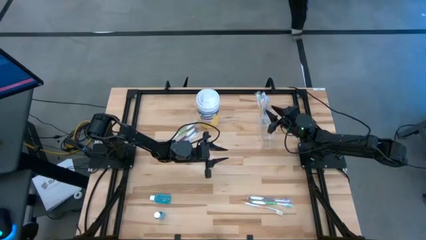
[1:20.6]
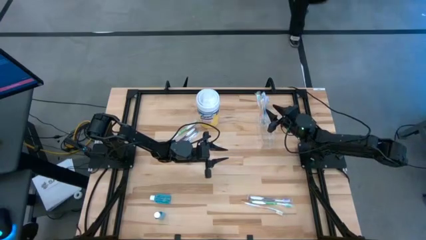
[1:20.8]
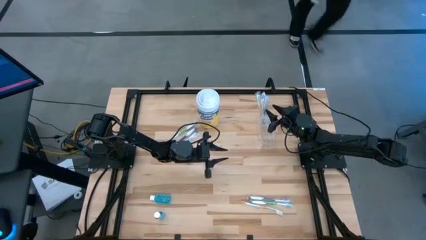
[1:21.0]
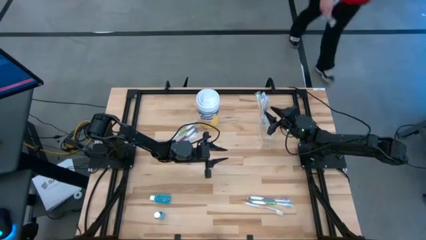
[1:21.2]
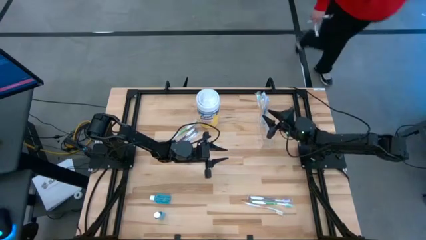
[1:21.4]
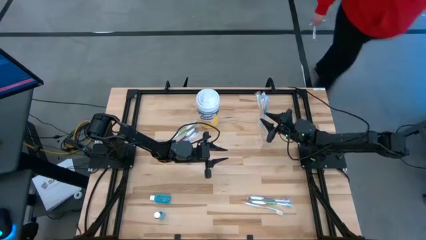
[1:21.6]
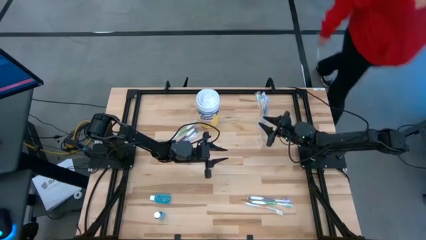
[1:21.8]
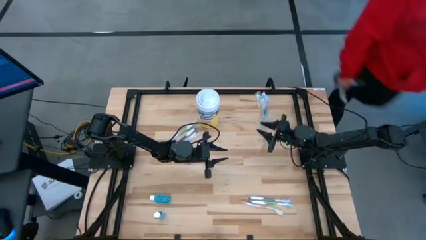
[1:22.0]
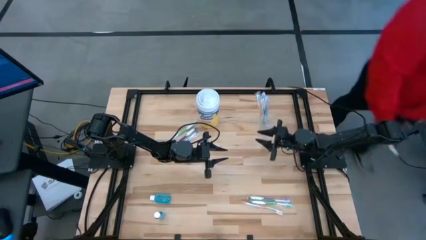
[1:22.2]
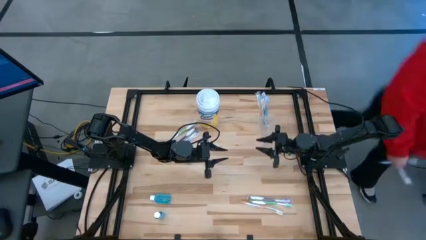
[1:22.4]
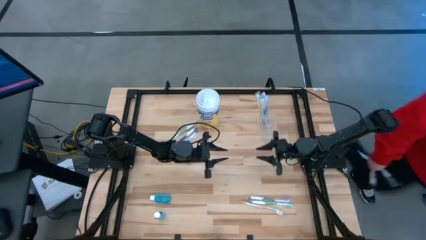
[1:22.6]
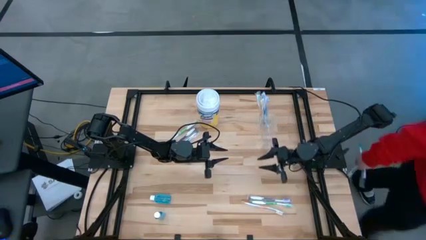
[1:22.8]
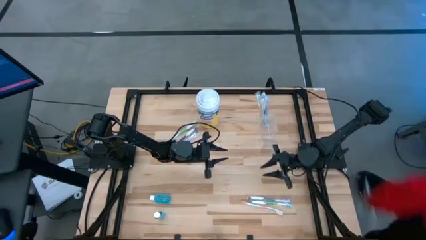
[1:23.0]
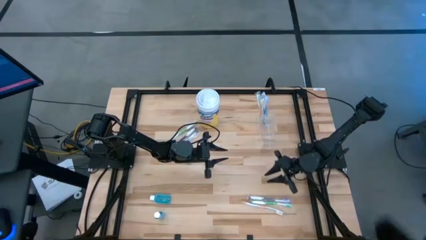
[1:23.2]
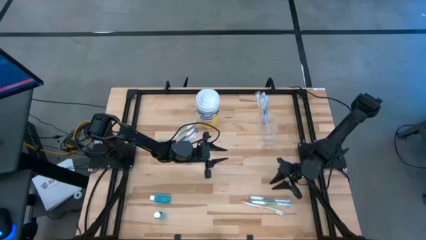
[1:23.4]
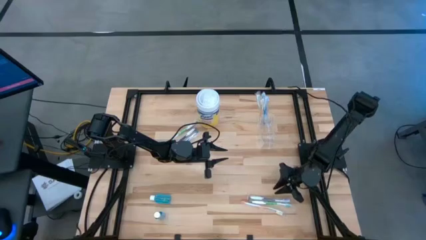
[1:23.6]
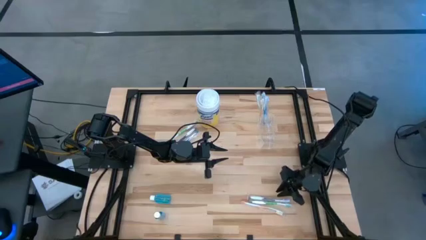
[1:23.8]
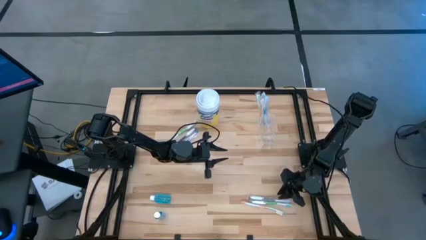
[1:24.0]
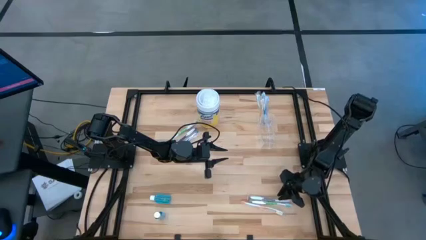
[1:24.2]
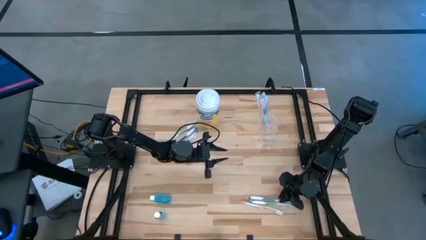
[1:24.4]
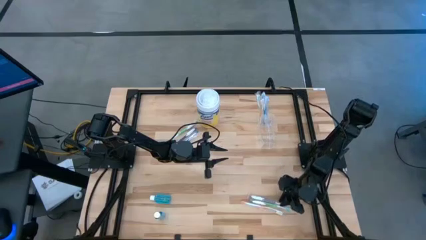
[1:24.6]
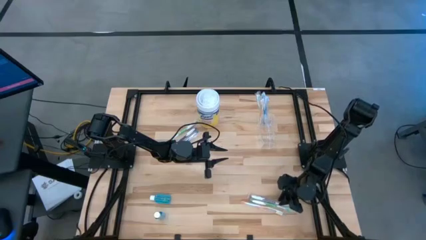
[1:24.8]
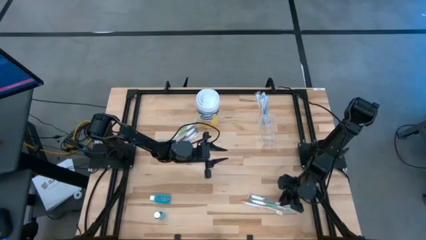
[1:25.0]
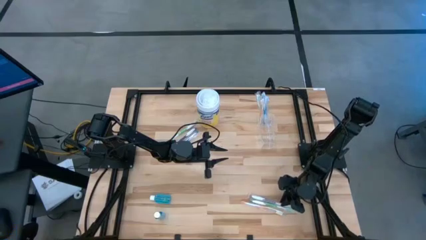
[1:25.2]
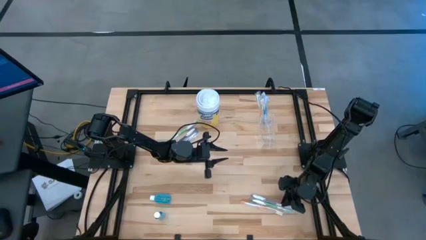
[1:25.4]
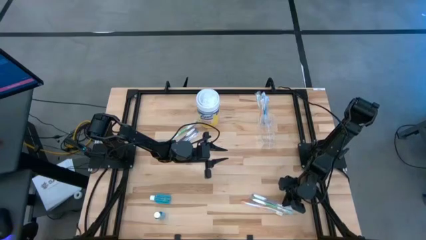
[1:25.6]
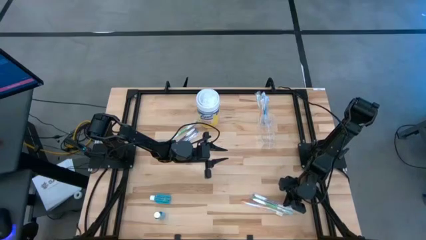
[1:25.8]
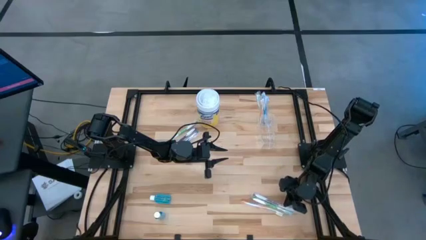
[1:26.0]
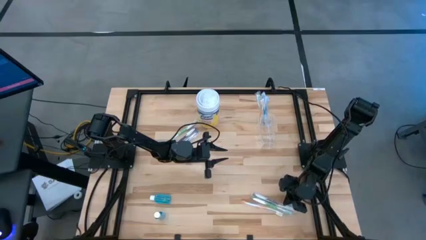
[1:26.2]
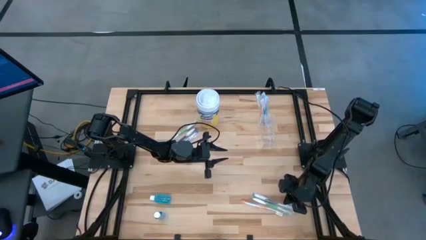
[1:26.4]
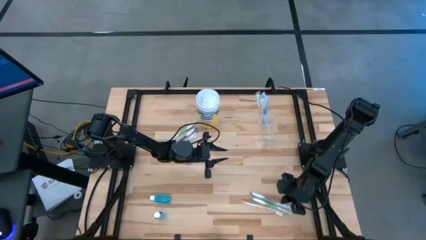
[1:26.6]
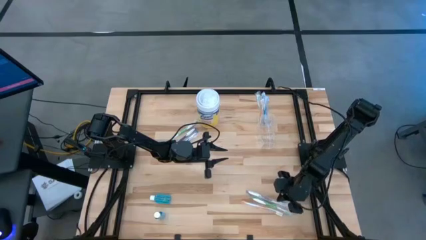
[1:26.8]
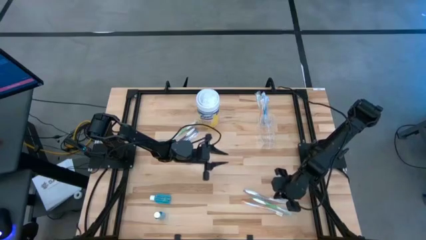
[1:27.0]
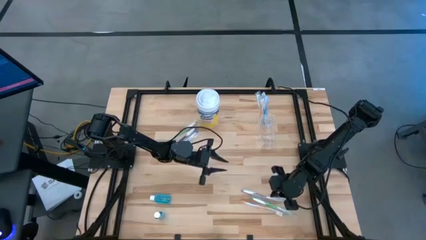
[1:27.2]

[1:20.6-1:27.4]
Task: Pick & Place toothbrushing station
Put the bottom purple toothbrush into the transparent organizer

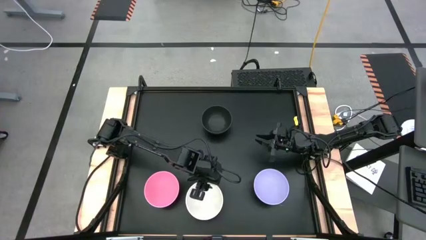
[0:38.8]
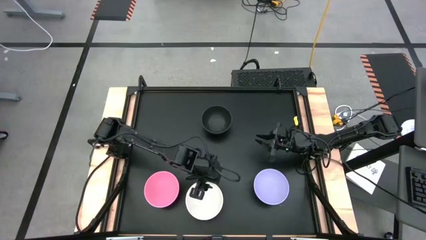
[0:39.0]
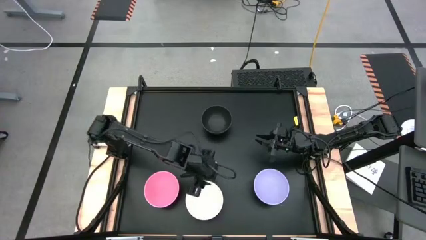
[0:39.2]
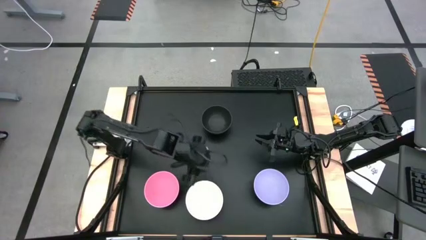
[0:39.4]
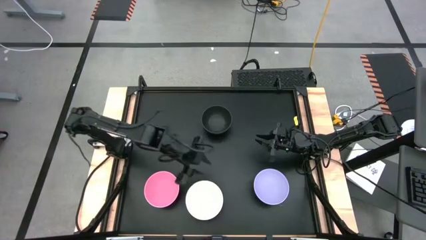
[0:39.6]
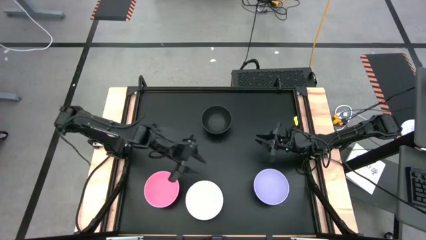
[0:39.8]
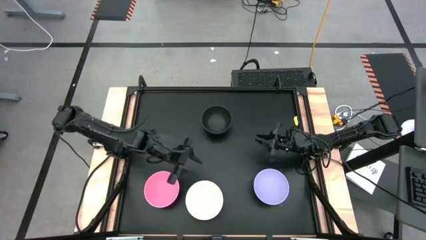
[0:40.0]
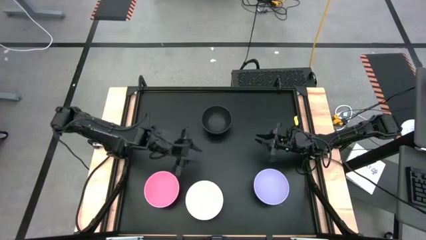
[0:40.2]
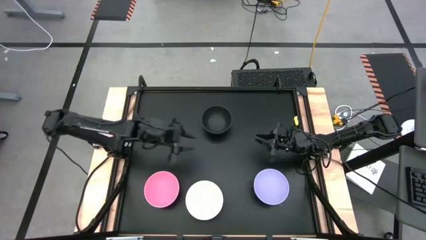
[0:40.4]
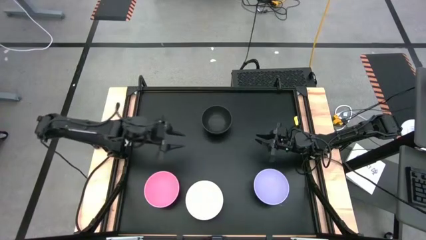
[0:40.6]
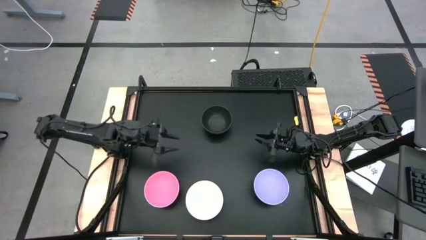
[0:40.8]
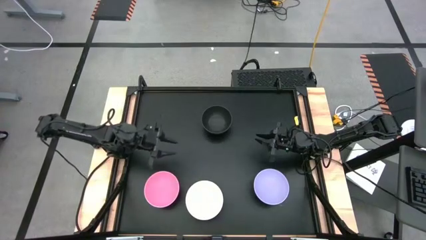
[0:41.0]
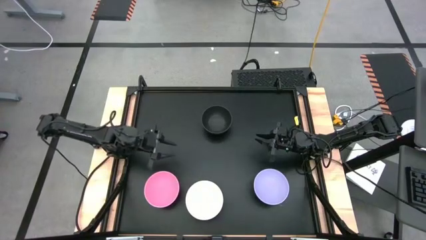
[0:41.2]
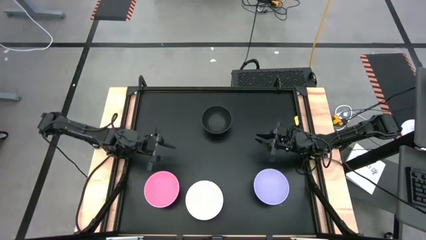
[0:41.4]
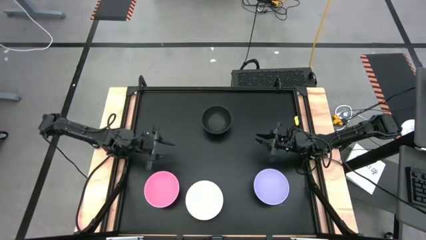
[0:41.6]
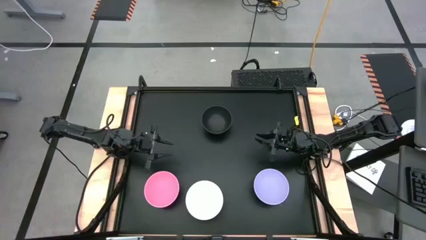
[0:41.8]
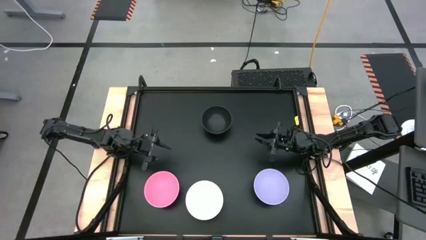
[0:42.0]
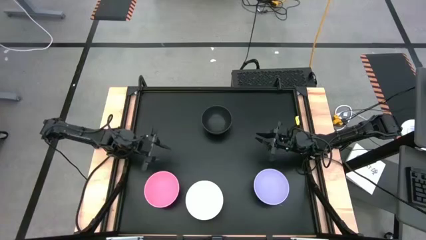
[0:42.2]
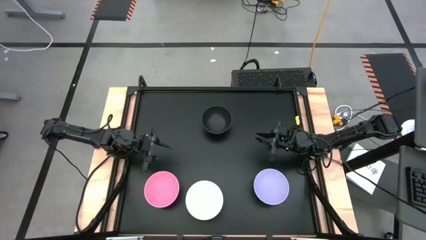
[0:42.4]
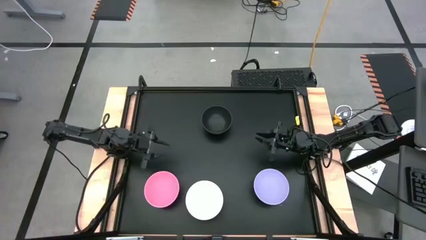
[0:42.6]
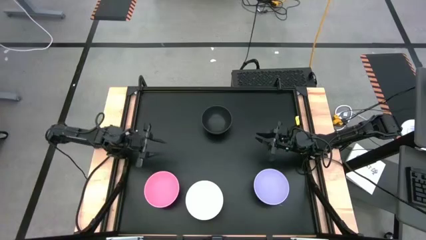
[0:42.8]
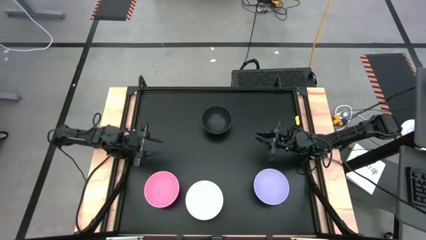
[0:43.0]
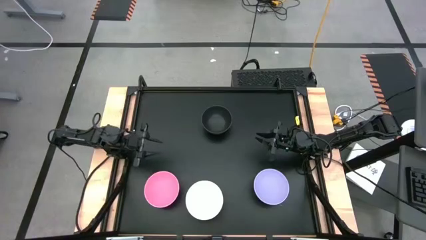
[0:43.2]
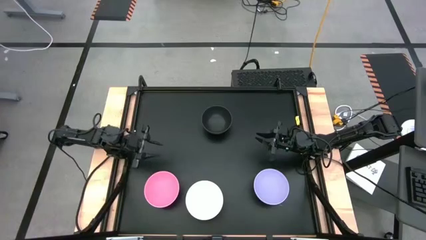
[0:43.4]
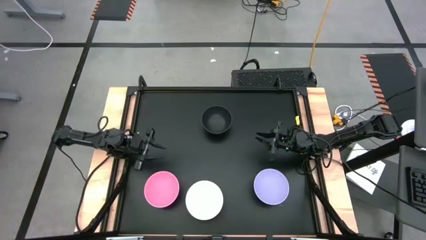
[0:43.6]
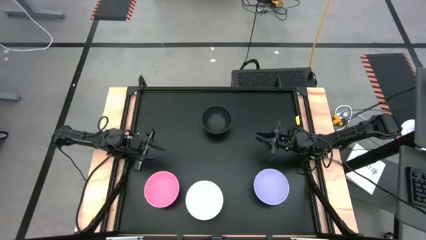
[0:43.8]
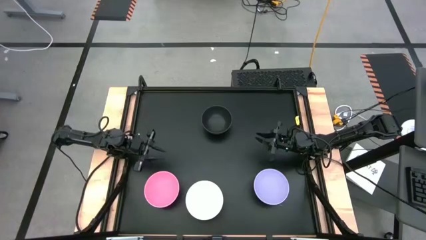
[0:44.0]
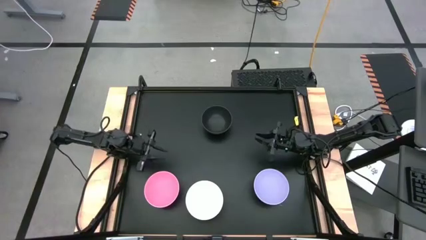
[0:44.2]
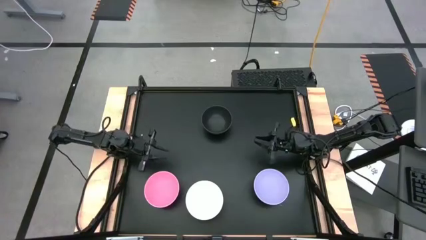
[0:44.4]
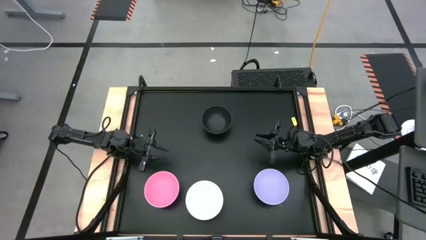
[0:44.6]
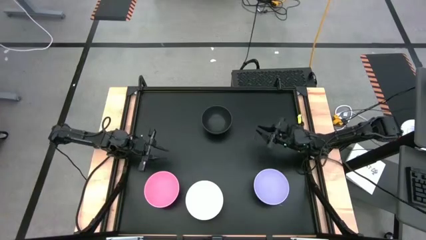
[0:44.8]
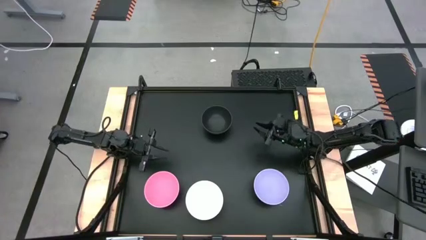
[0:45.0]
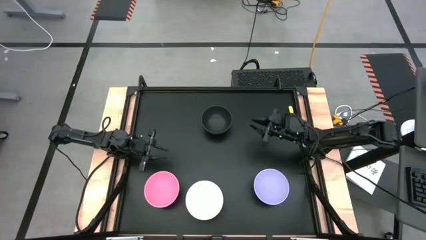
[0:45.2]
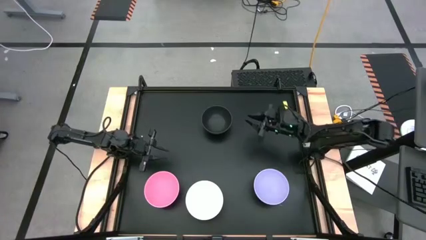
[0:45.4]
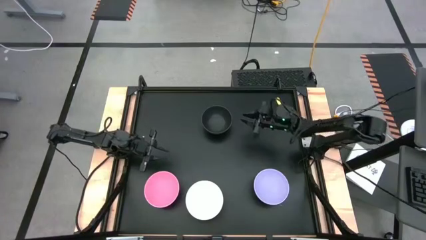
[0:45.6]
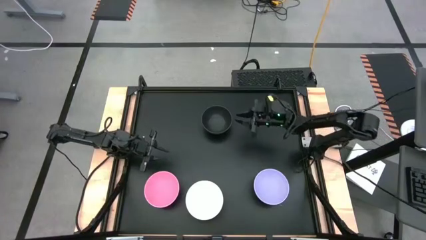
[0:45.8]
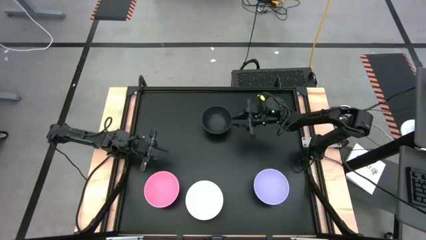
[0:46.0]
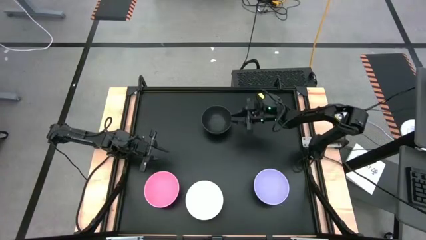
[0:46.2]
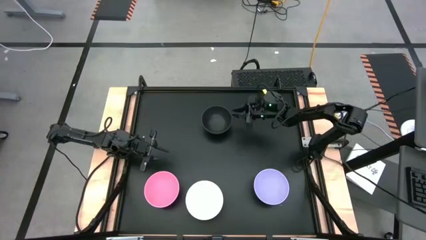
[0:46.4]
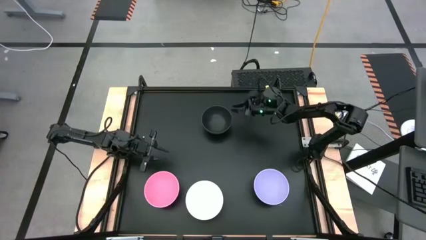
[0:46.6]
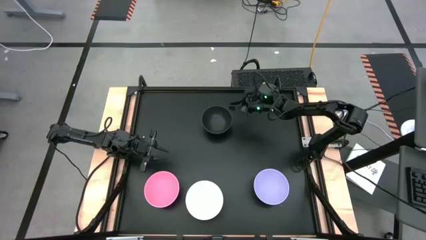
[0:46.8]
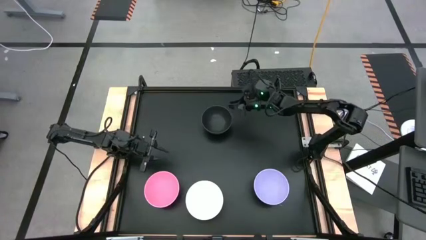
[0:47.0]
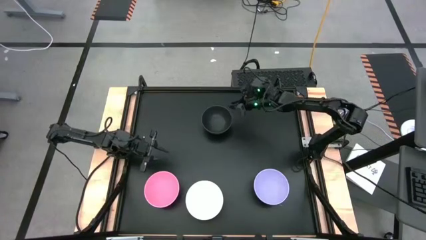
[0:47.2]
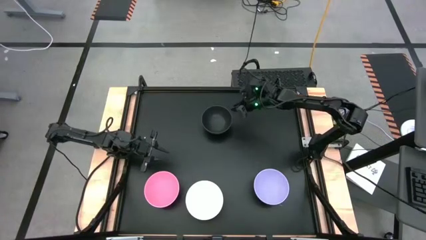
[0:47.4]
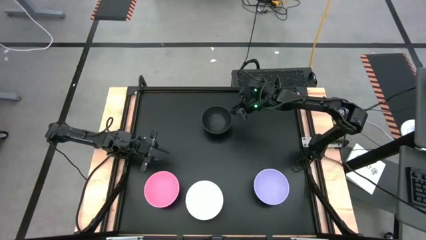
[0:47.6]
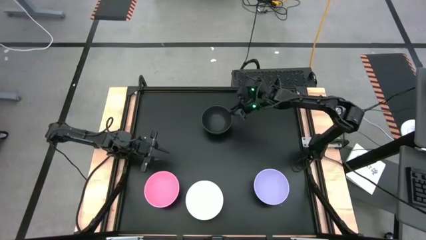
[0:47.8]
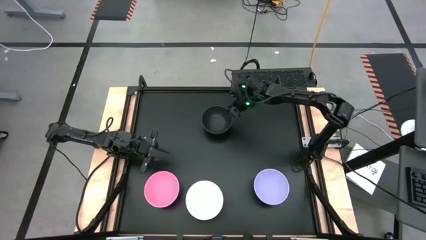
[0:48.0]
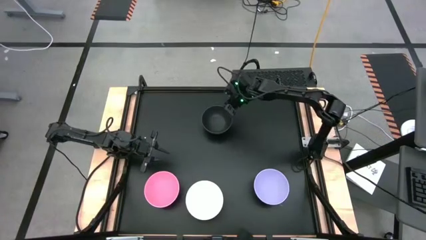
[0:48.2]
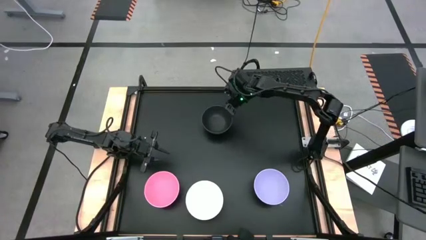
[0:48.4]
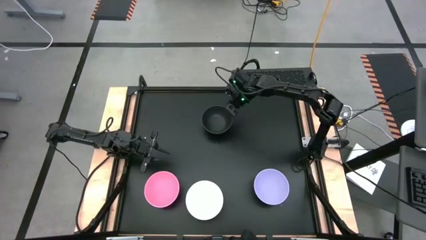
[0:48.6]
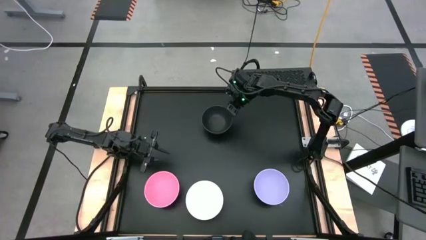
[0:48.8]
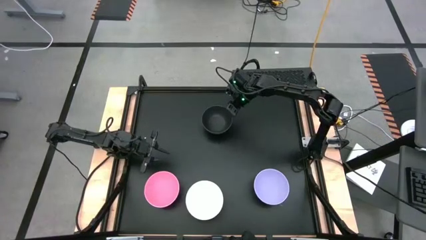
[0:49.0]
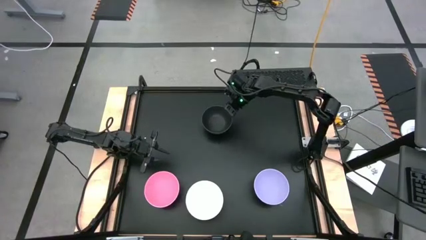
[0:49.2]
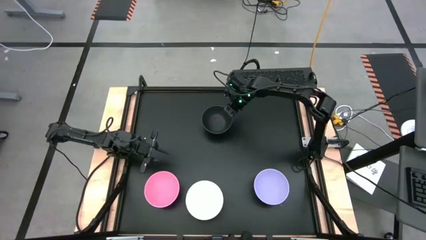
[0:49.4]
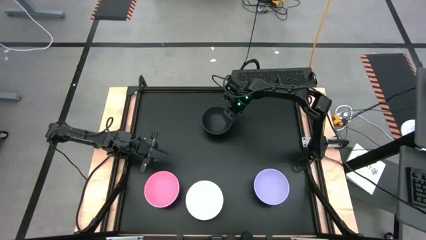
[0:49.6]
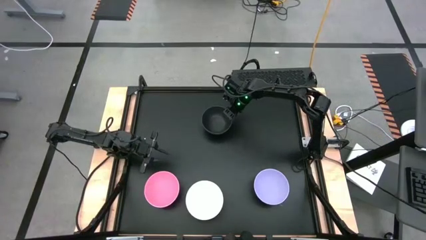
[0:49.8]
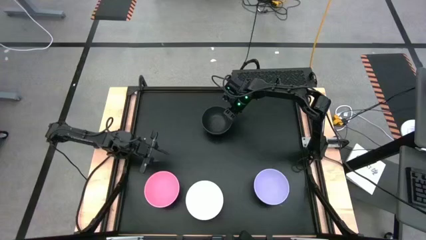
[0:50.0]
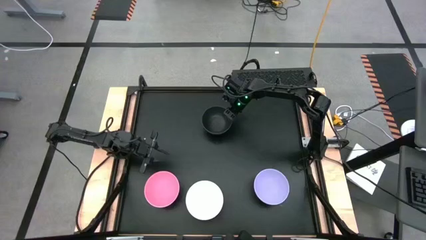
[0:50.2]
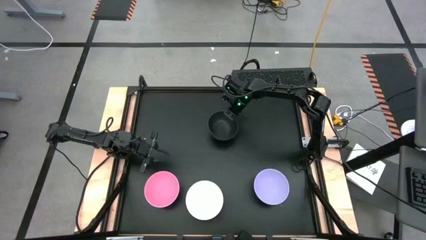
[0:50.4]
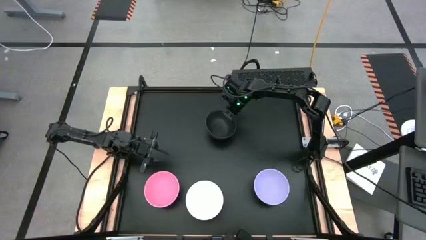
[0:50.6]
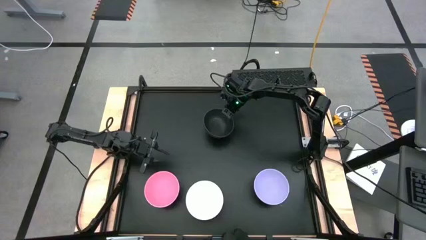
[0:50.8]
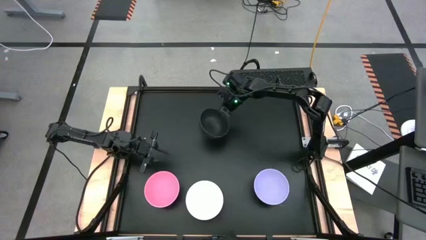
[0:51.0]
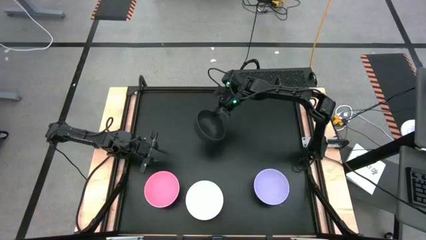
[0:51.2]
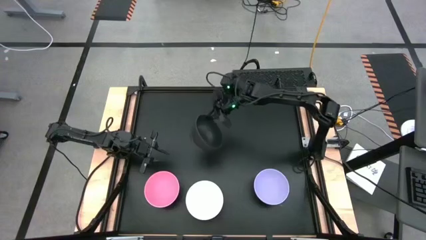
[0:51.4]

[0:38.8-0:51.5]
Task: Nest bowls inside each other
Stack the black bowl on top of the stacked white bowl
